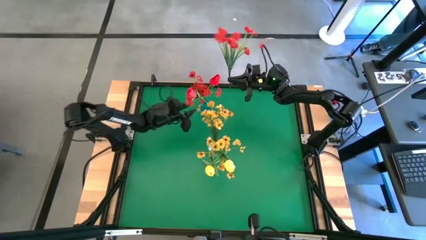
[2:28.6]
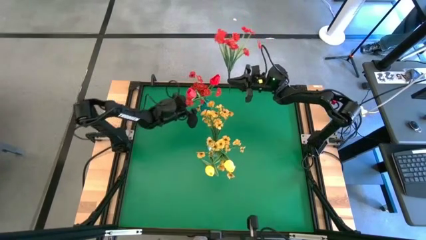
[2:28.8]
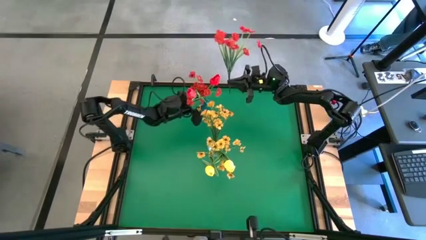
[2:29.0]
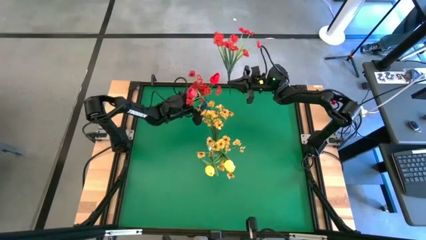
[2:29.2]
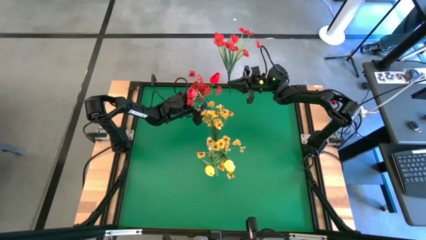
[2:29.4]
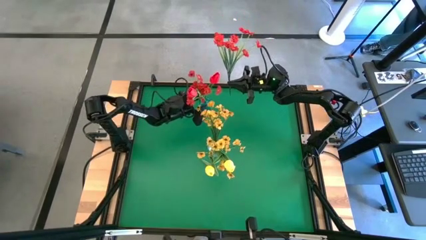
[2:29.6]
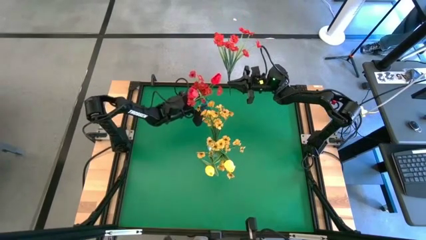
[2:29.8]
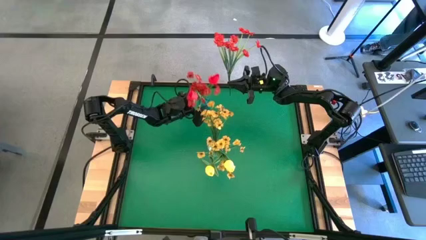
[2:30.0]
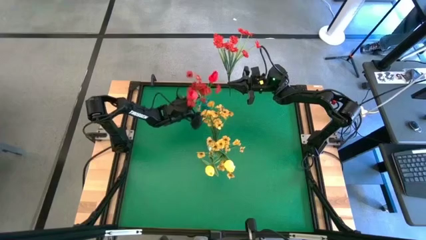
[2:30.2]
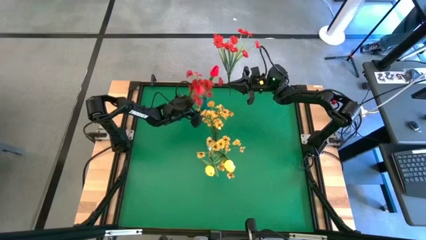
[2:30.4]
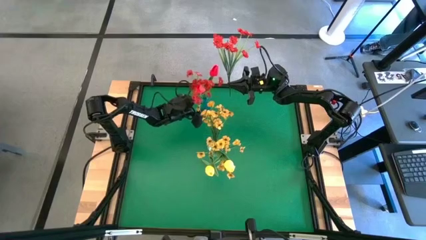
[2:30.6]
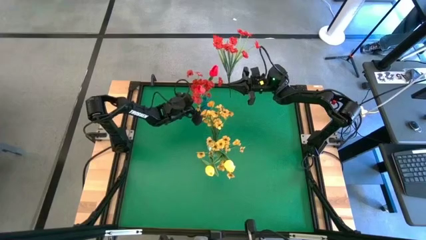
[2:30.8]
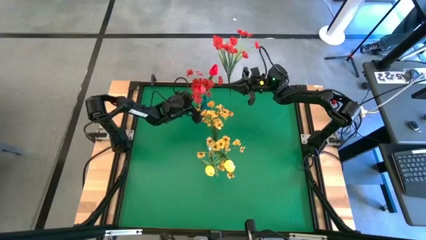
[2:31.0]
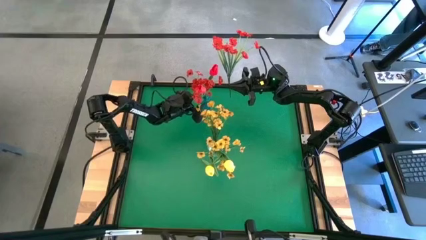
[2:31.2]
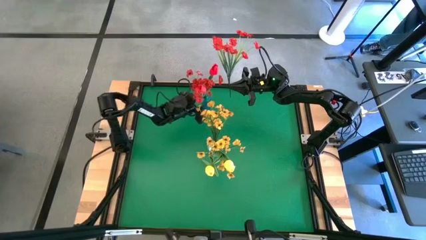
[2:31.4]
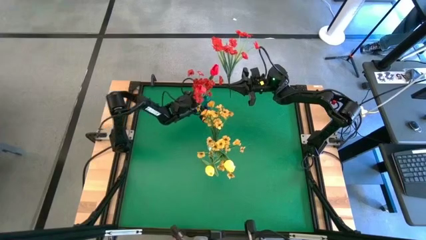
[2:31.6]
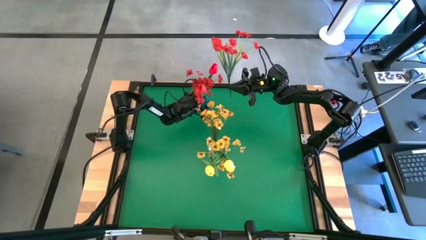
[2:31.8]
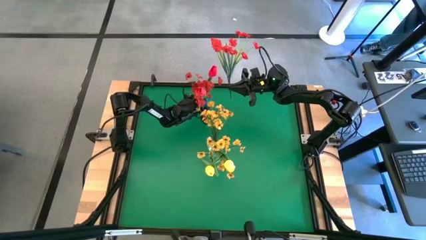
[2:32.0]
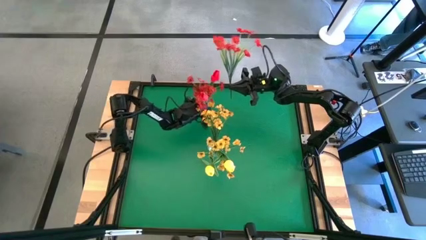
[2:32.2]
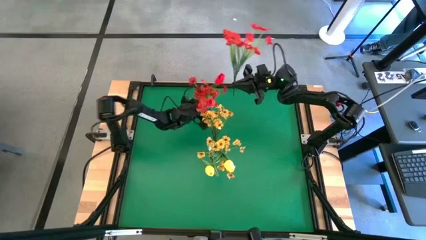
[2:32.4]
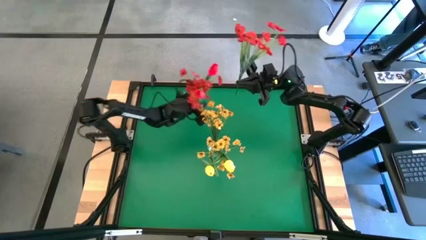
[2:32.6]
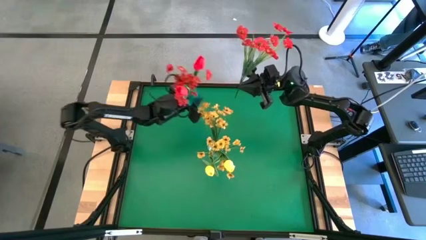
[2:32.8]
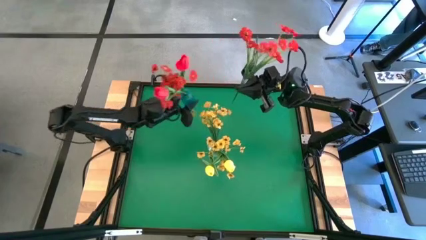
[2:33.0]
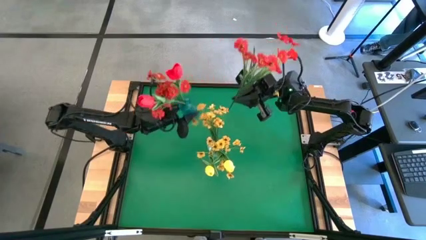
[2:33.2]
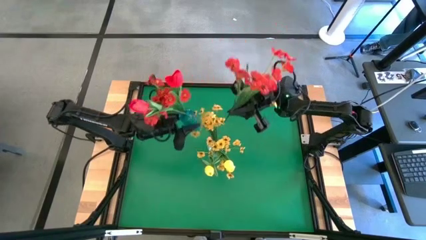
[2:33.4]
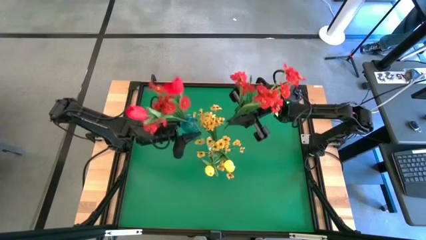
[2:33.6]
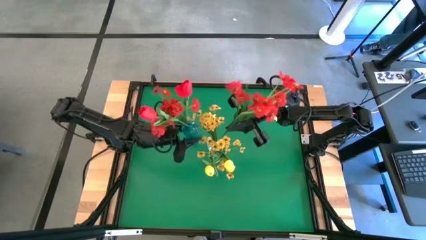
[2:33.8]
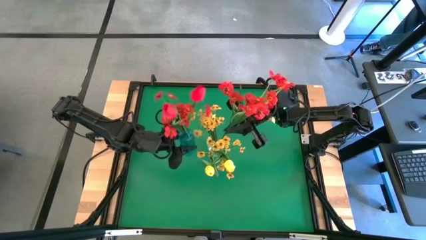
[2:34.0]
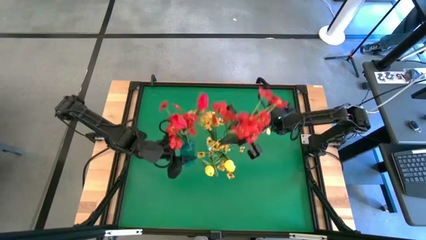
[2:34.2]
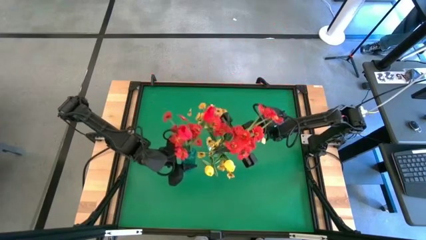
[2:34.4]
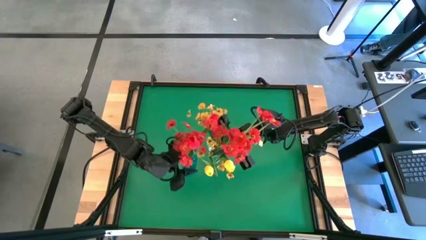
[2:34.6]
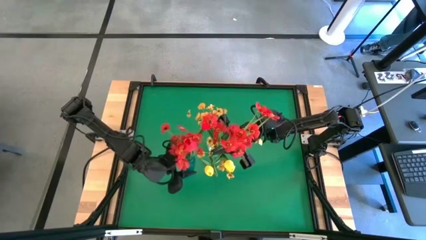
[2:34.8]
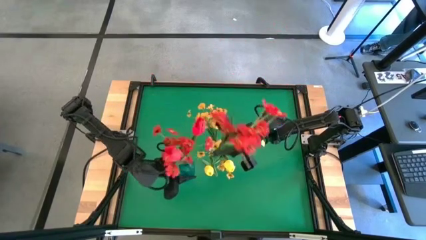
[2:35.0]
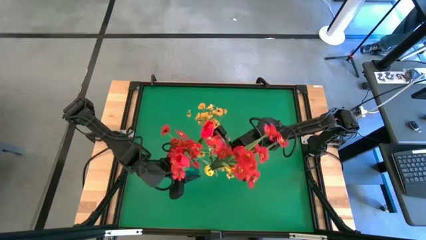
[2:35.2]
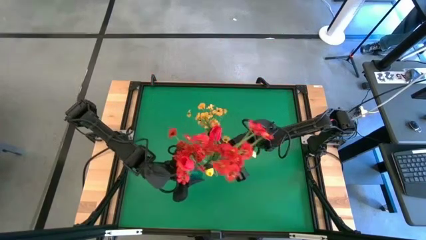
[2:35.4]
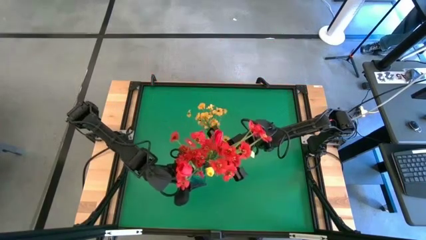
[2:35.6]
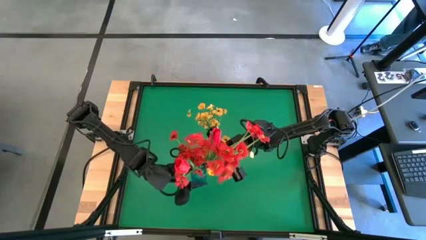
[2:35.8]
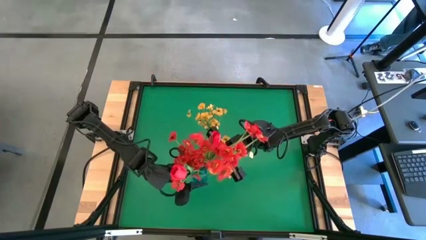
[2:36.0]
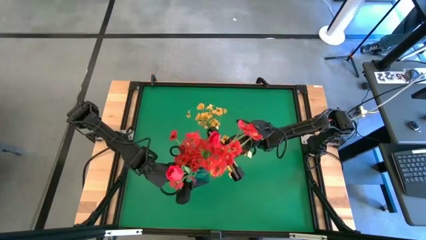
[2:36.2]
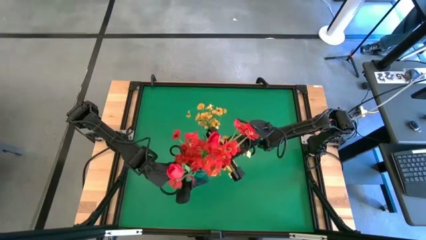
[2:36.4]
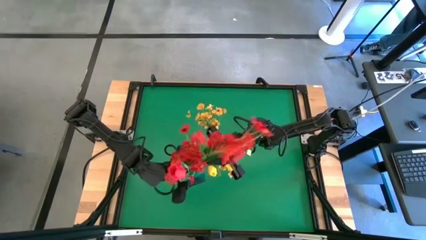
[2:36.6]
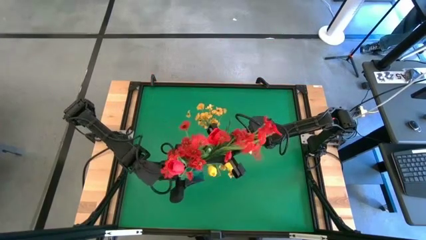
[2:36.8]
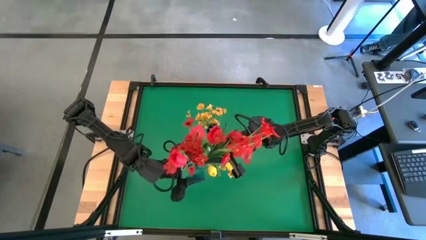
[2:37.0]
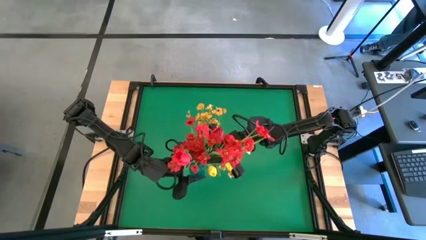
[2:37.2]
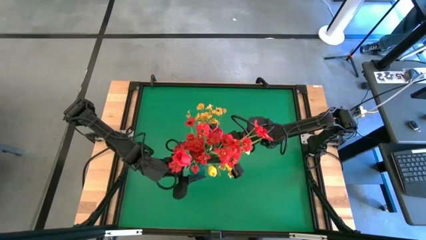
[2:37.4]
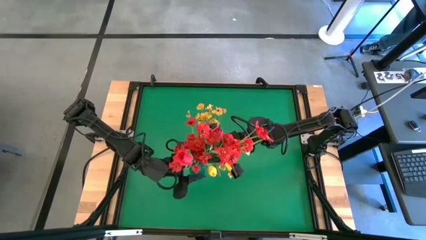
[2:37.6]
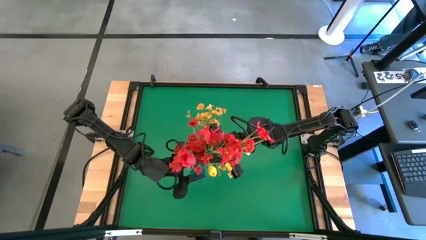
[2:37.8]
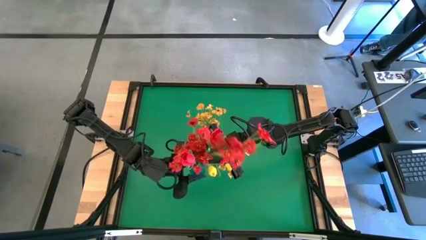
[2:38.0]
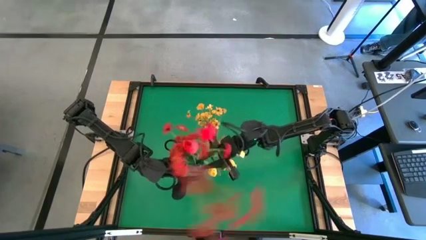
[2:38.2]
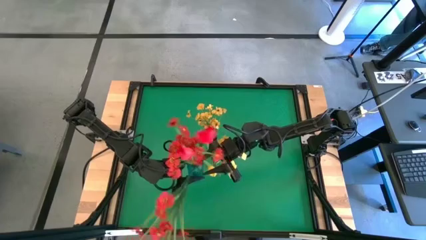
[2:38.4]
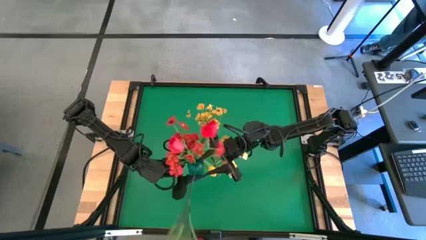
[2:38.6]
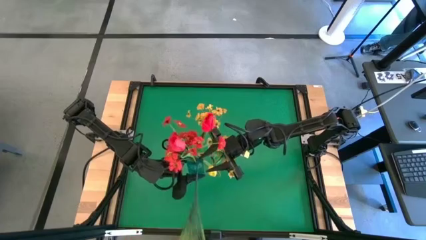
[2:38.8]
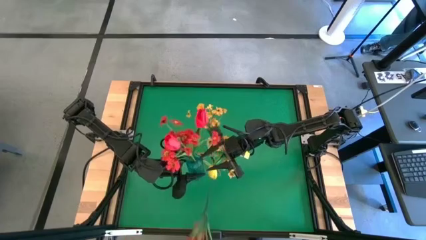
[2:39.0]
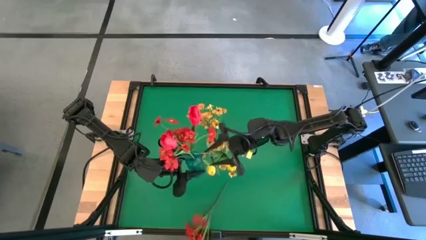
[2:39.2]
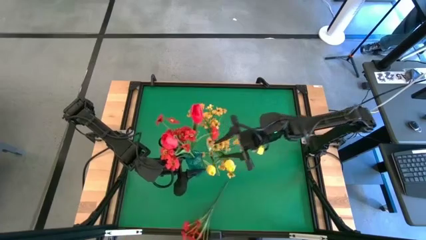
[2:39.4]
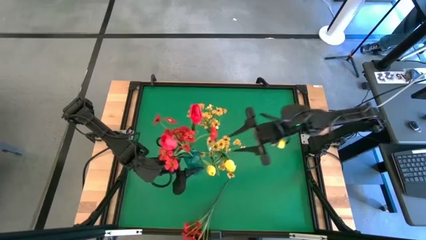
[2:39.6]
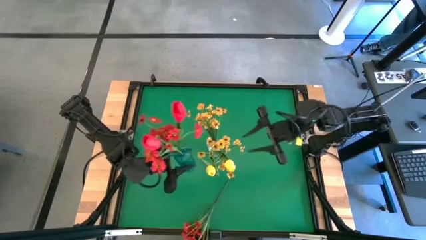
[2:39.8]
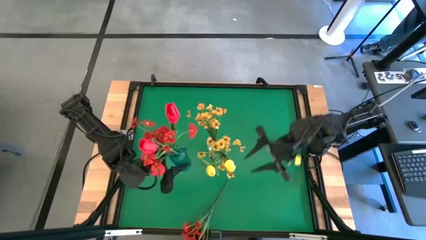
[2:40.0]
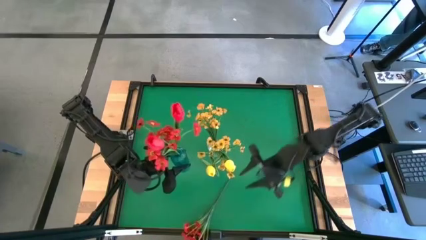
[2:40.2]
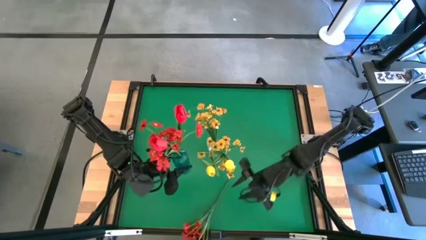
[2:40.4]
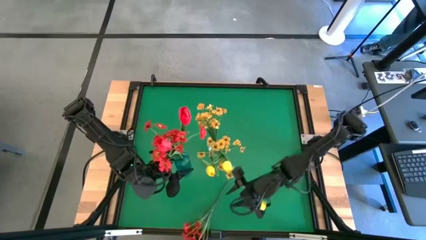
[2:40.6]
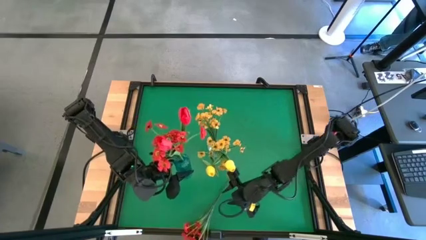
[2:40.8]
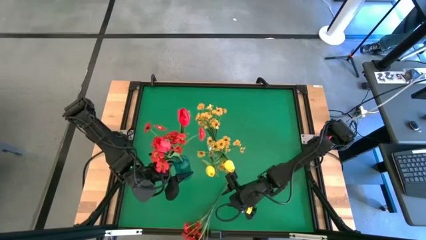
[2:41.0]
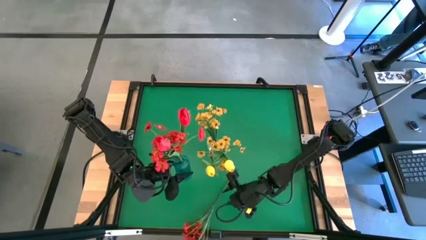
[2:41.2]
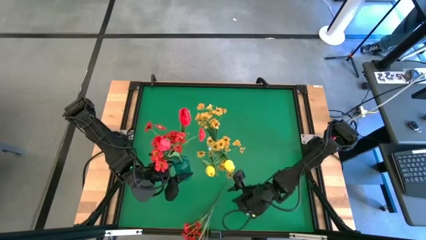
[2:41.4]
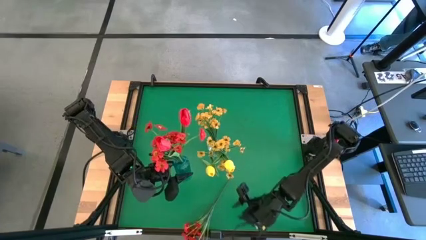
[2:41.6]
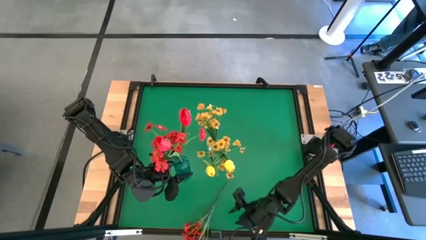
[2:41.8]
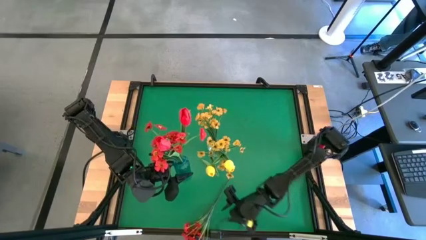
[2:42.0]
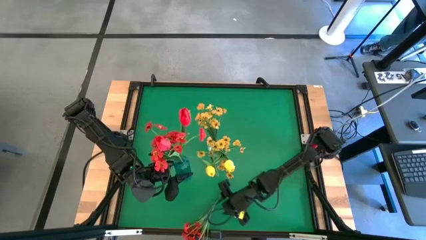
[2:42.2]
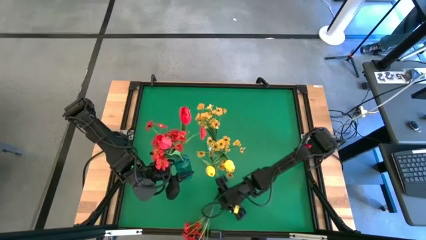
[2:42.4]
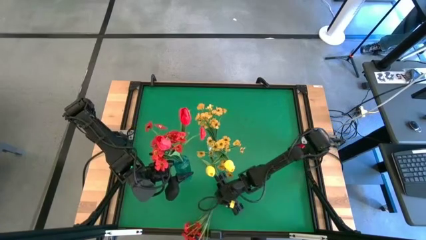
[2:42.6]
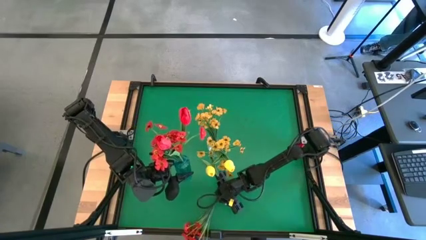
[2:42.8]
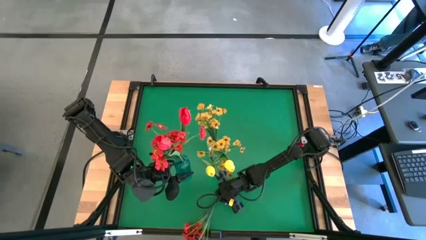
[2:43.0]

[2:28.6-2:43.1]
Task: Sort flowers into vase by color
Put the red flowers into the blue vase
